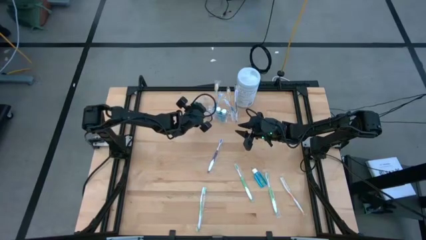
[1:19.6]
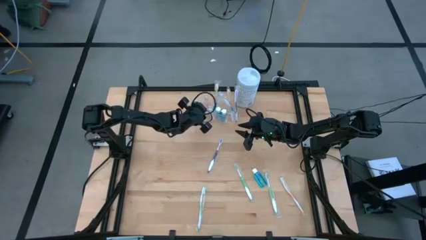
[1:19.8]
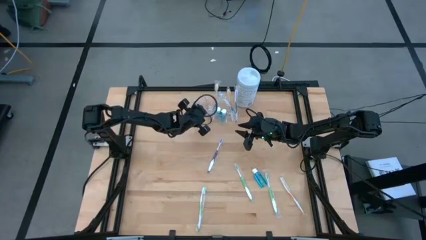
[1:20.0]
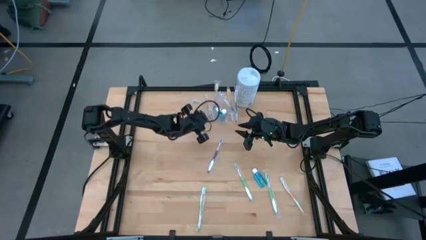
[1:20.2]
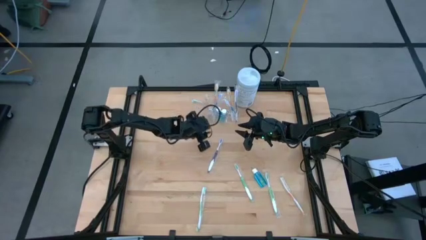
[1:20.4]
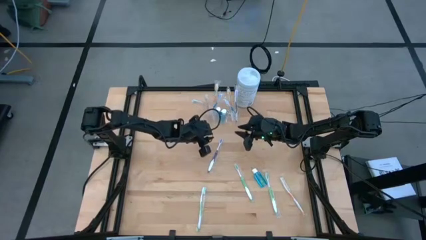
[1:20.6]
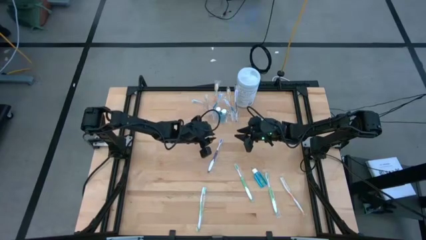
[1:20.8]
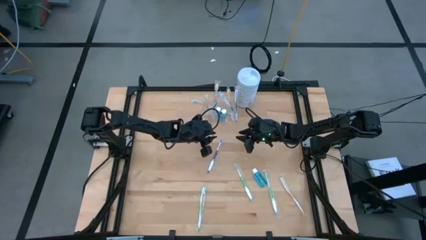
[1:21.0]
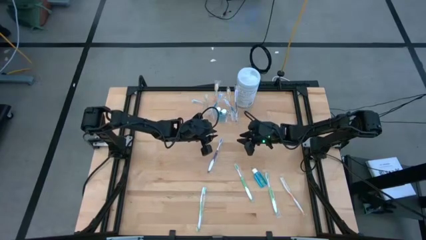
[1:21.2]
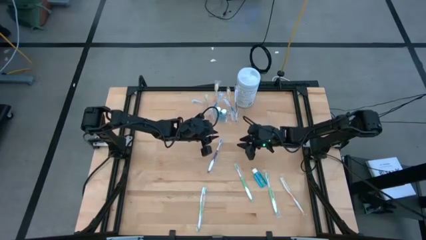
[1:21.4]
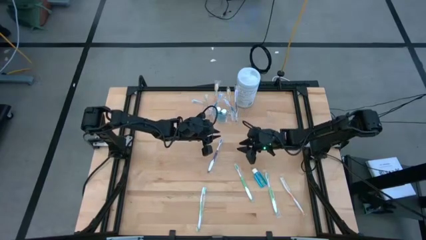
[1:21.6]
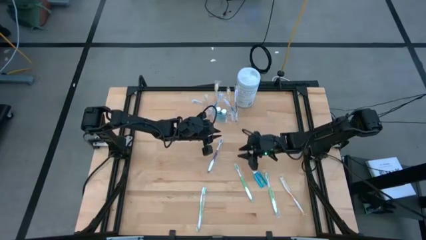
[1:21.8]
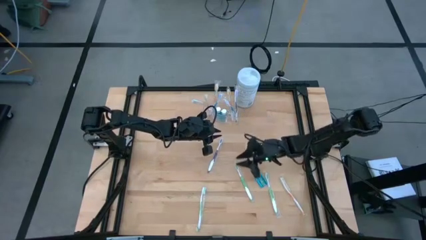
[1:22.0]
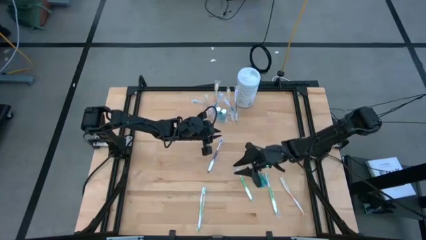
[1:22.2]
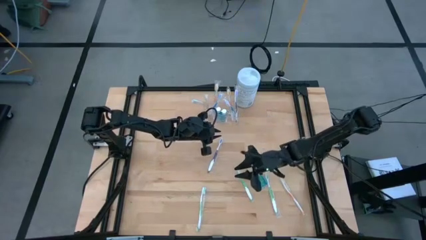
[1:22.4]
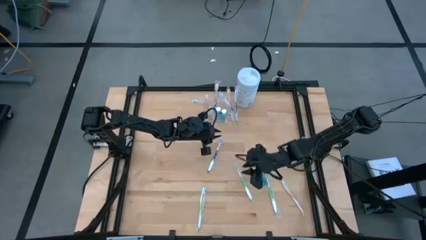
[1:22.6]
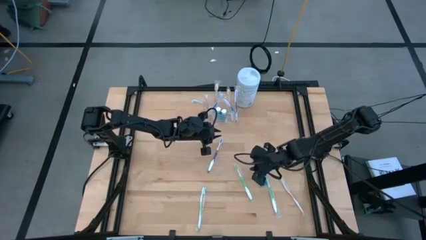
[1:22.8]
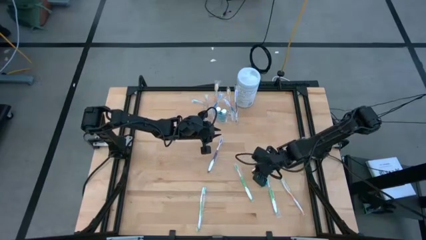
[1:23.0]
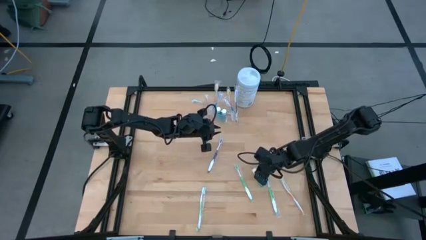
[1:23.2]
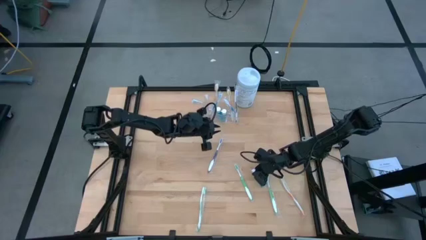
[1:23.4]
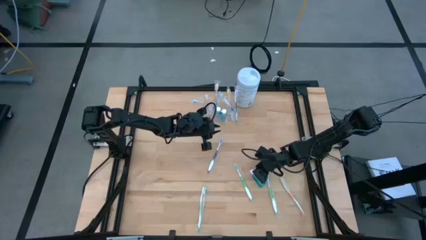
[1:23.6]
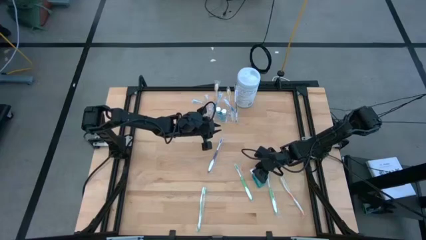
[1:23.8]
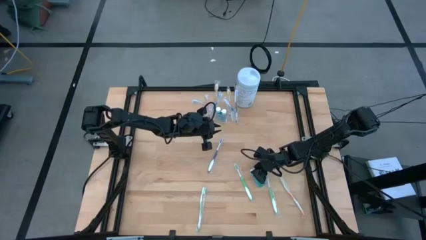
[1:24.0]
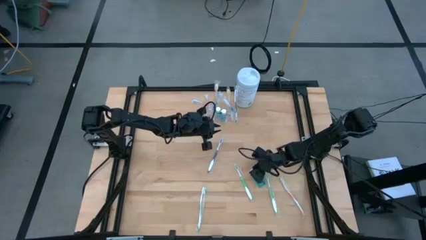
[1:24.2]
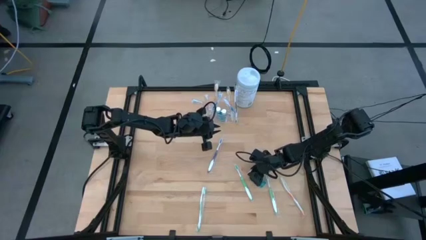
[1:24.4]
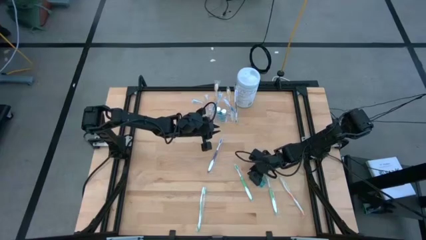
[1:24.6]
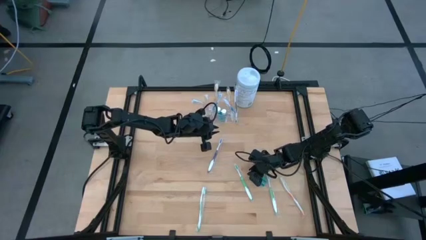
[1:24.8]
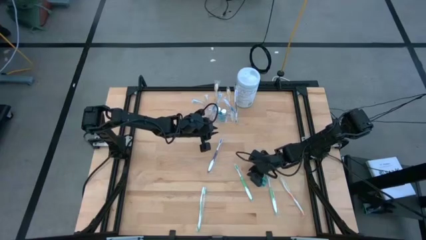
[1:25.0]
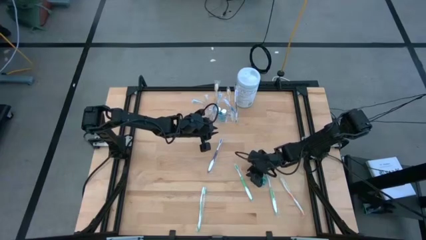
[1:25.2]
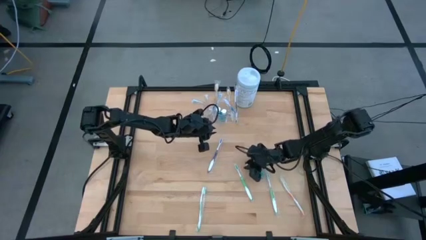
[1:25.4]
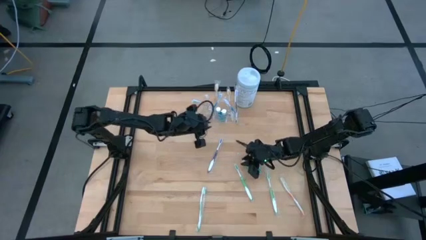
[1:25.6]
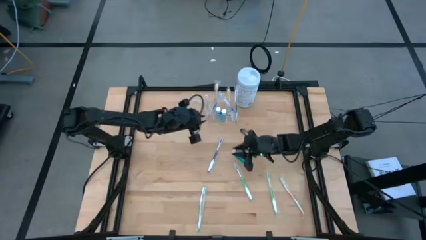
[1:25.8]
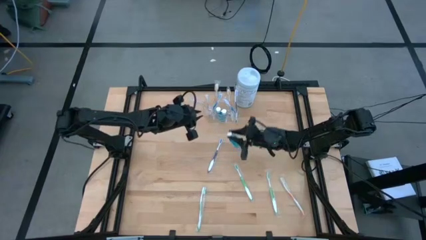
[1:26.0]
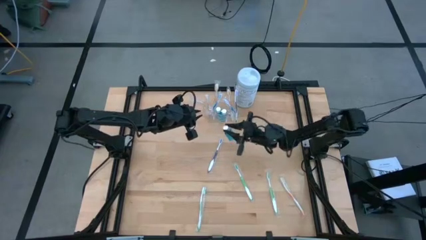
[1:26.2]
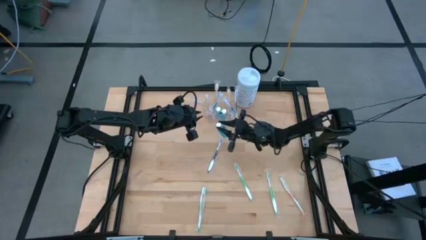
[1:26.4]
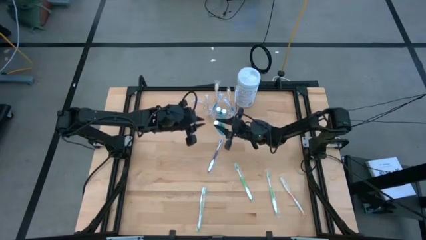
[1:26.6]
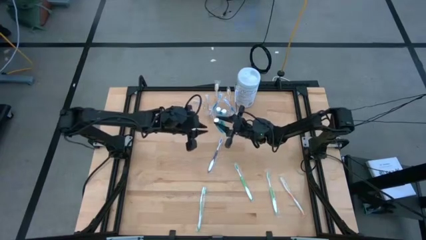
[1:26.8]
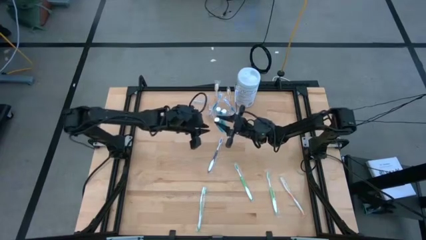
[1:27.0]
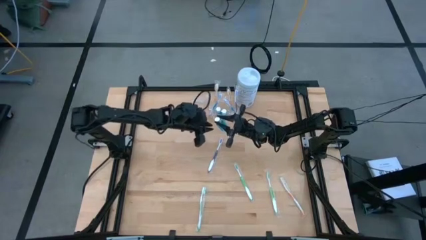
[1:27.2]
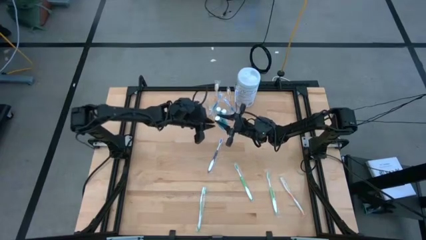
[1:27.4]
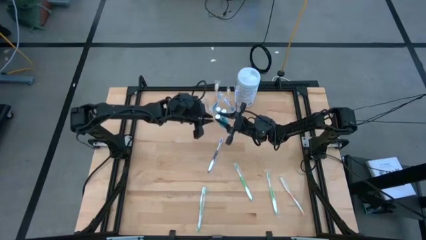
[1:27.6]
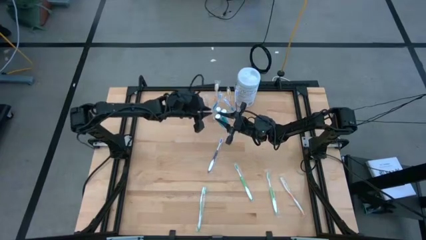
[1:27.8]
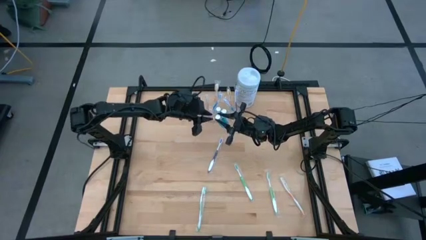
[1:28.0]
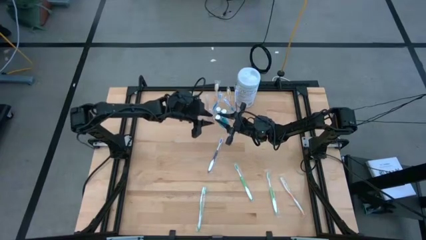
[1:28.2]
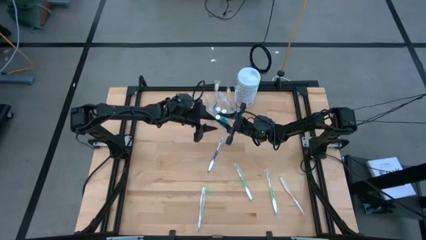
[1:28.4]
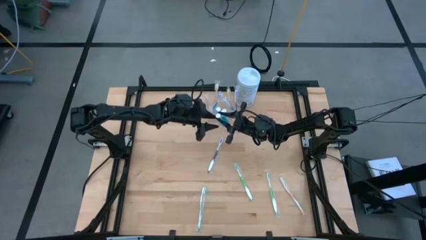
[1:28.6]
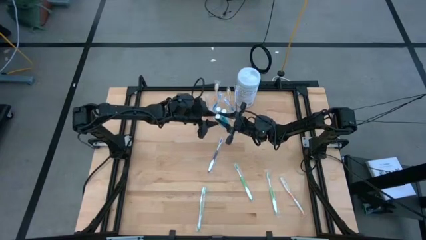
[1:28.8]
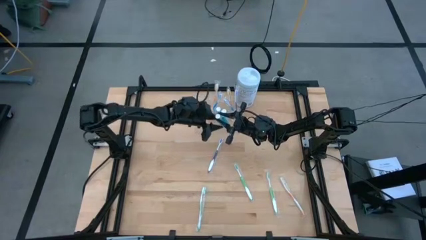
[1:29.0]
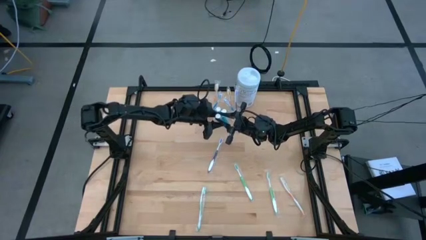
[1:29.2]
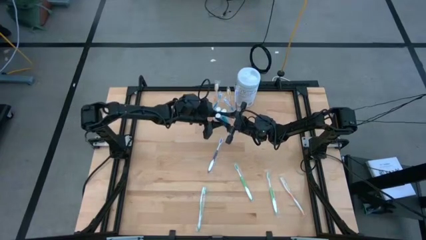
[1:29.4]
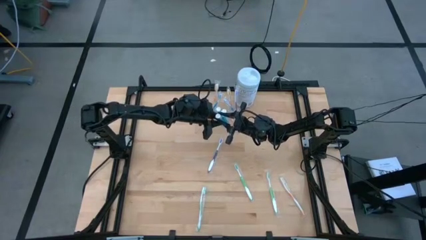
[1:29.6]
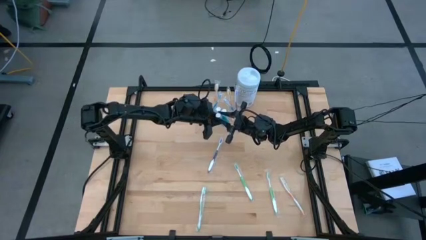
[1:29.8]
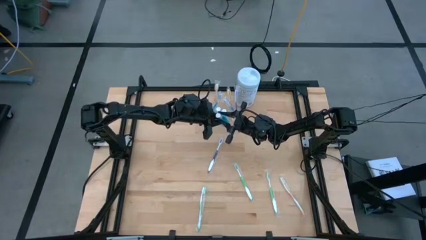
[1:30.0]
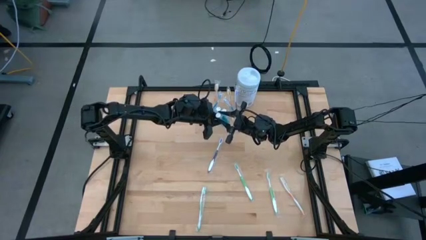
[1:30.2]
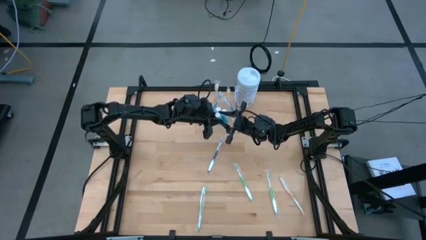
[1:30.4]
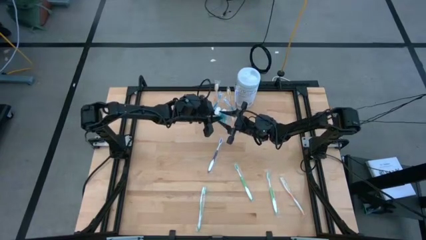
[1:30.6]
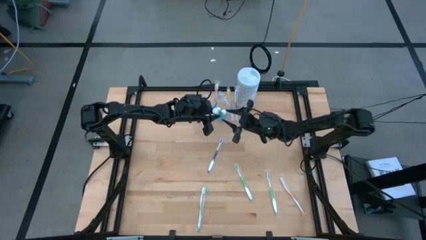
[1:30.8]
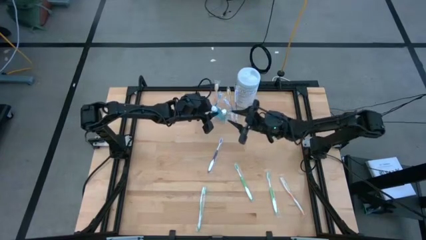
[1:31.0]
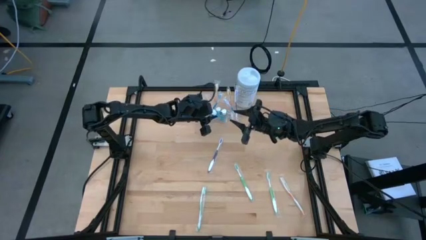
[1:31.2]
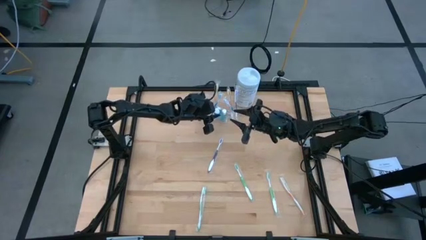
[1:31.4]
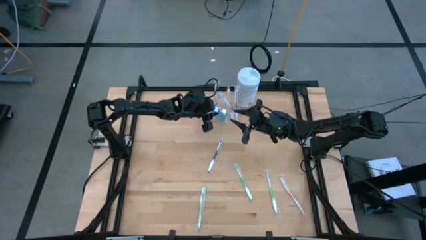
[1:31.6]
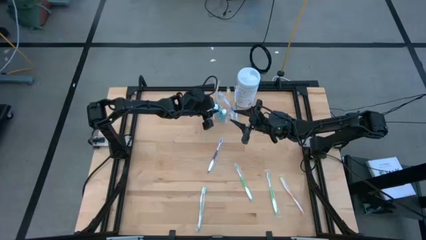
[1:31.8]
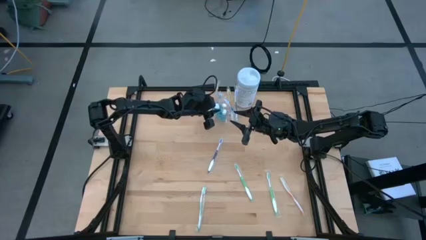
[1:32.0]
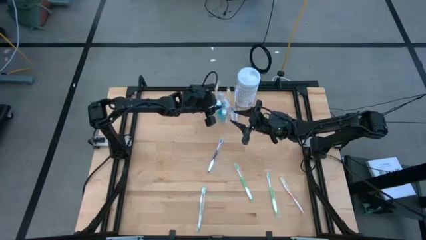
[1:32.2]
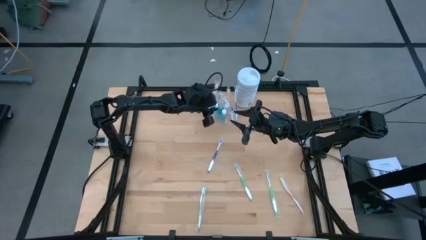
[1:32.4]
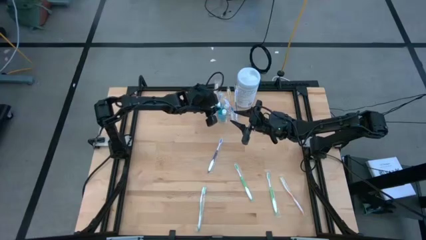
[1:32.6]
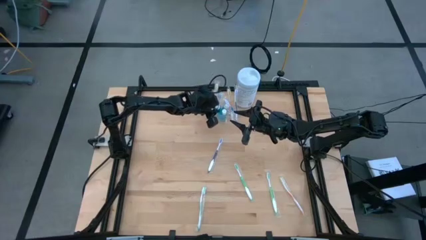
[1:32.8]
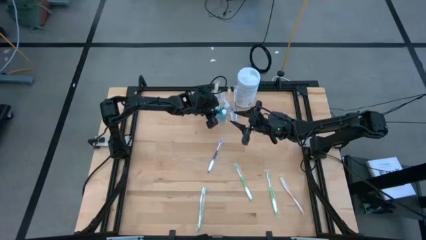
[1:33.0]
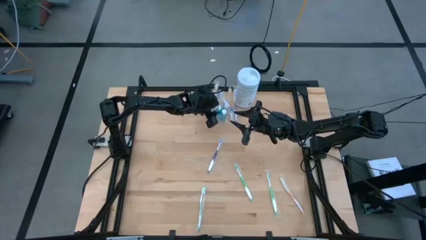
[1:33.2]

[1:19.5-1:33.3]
Task: Pick & Place toothbrushing station
Put the blue mouthwash into the transparent organizer

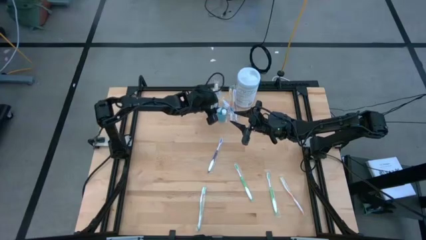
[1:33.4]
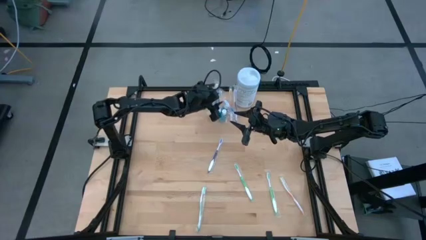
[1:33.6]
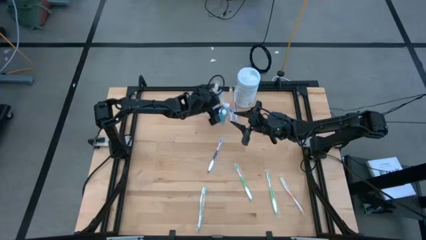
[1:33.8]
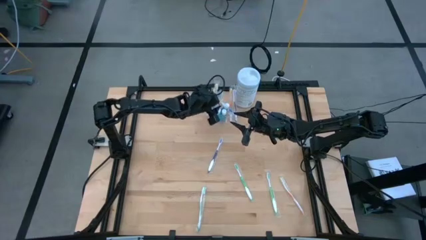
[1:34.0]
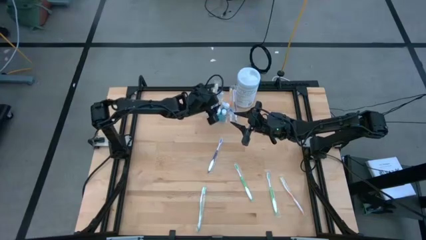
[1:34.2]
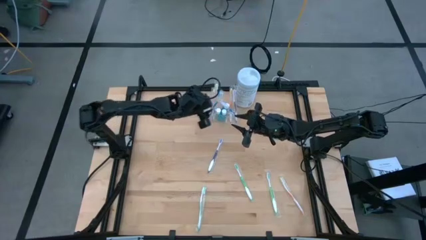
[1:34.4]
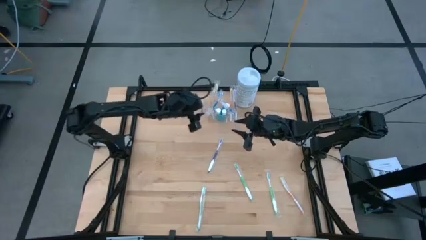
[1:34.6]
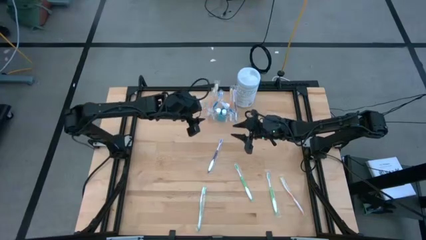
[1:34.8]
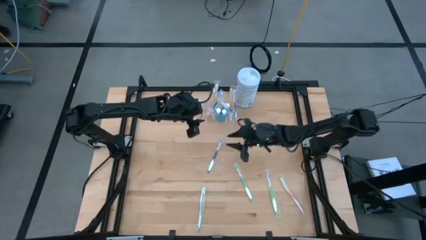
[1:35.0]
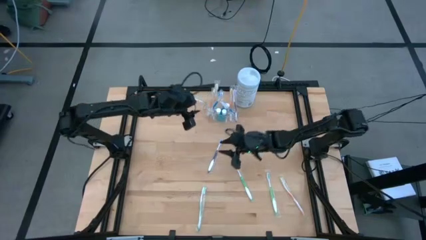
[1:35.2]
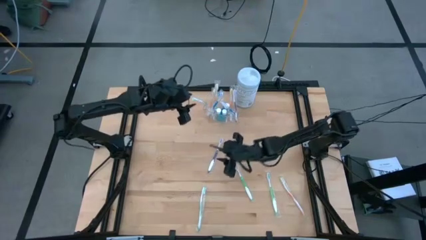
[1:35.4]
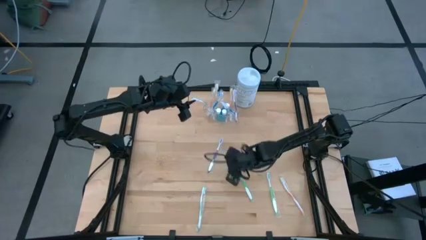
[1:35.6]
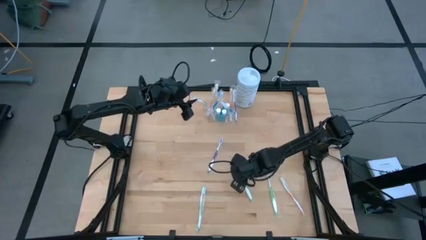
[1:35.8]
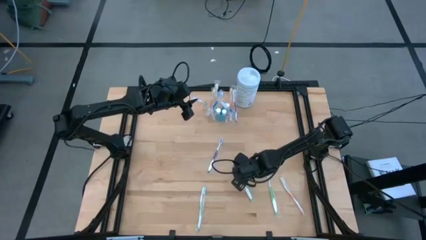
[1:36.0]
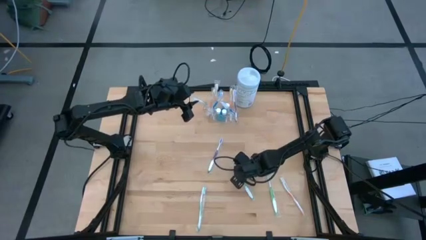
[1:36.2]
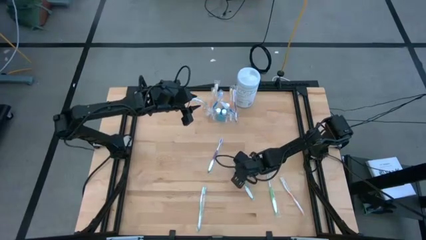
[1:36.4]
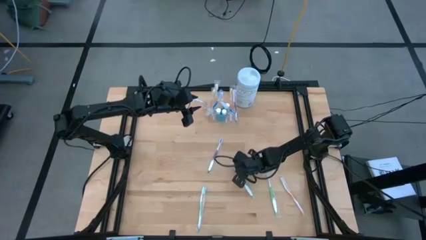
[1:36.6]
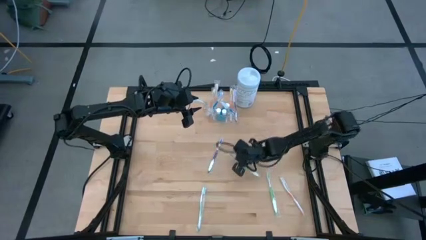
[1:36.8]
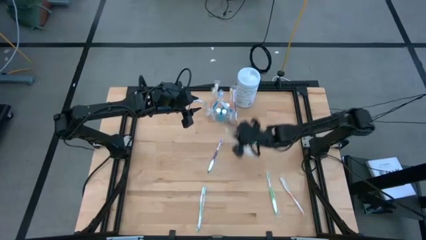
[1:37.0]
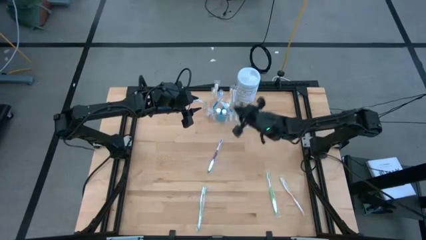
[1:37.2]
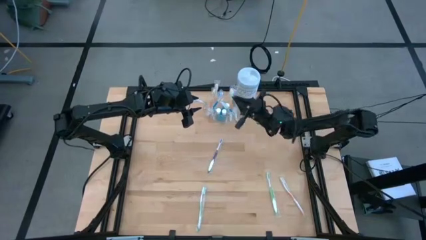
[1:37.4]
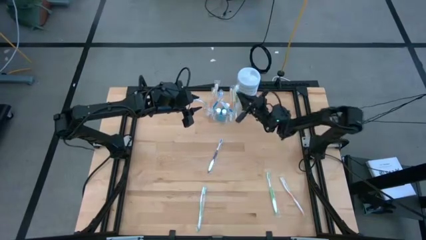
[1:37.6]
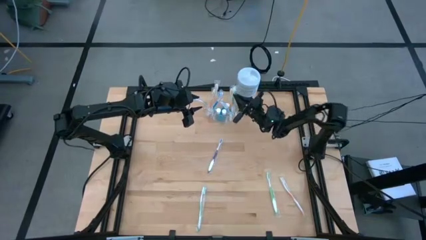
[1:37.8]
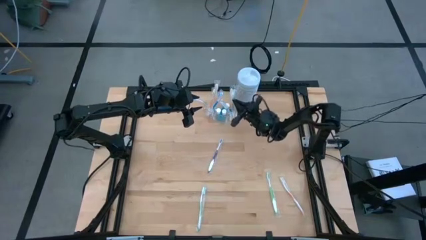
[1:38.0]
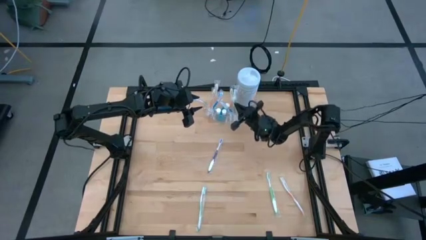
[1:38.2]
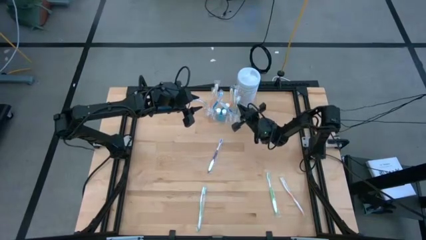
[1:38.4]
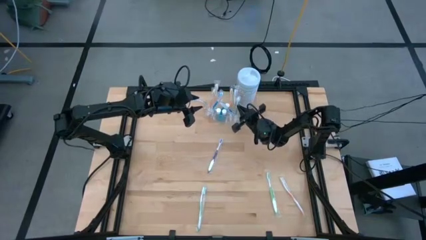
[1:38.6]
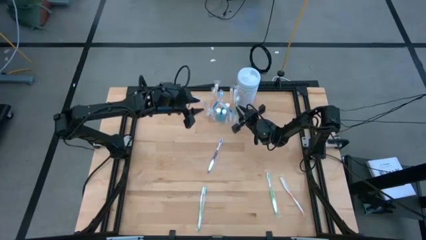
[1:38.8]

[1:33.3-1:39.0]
Put the green toothbrush into the transparent organizer
